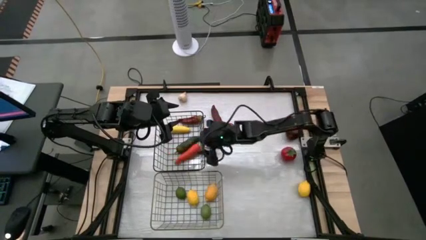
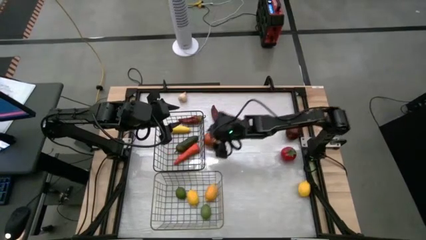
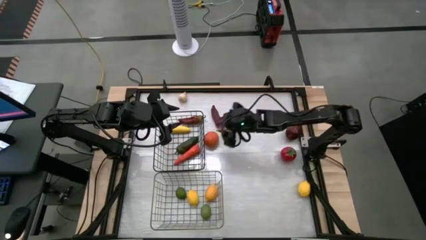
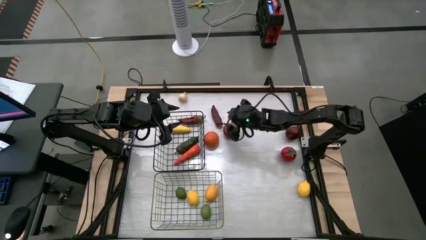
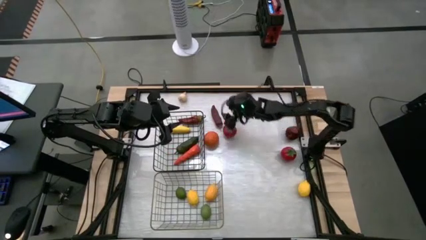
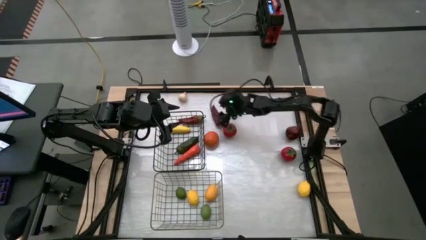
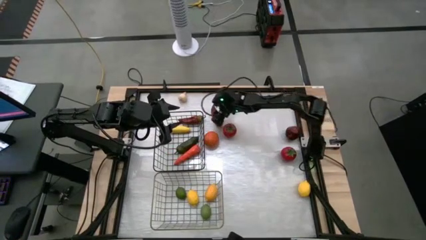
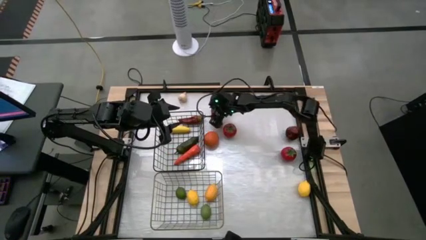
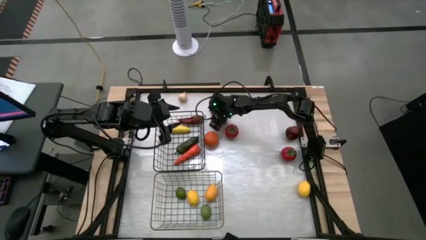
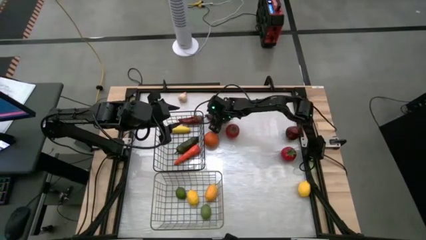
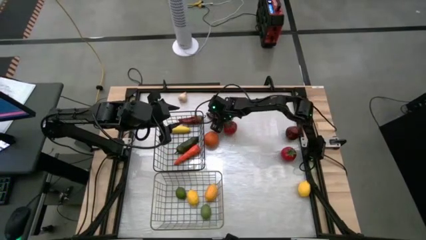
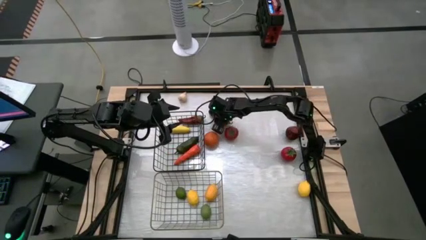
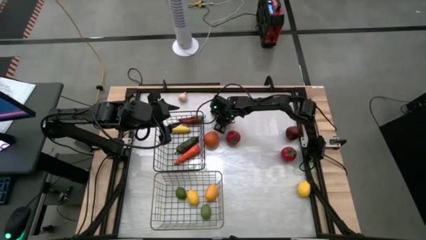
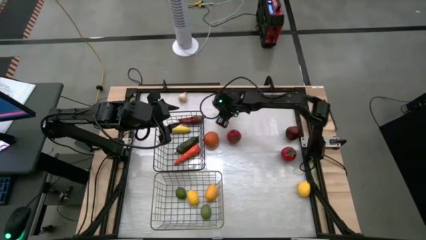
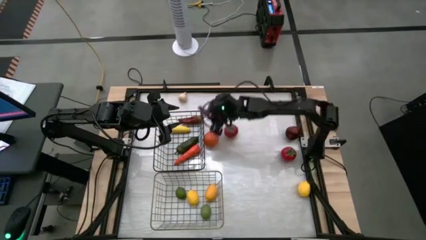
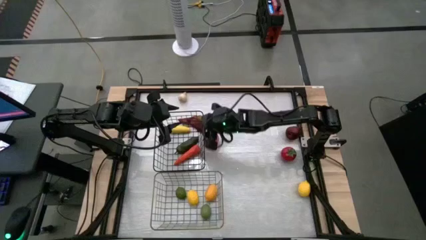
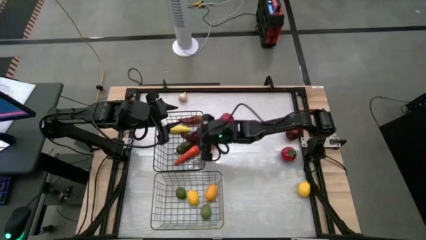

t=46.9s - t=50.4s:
Task: Sort produce into baskets
Put the right red chili pepper into the black wire basket

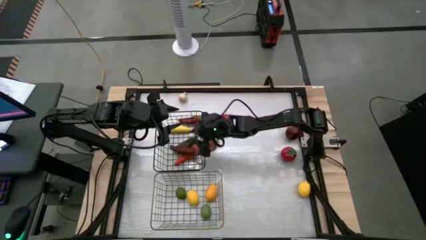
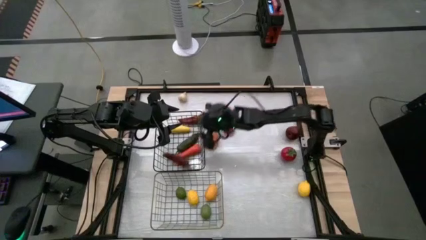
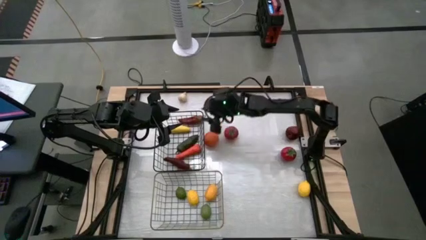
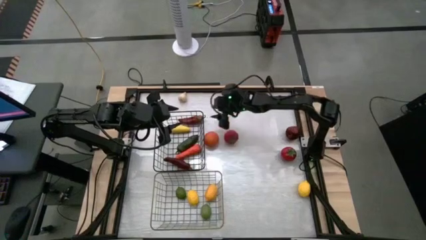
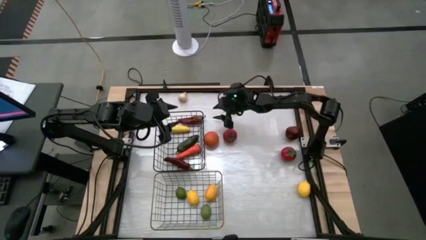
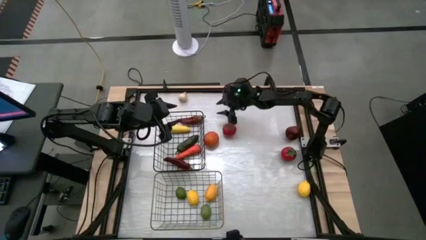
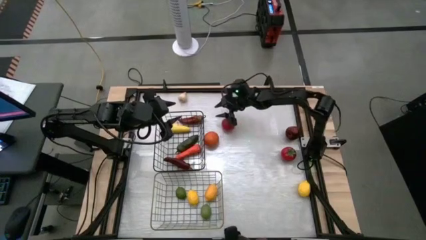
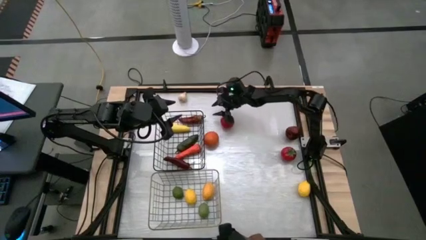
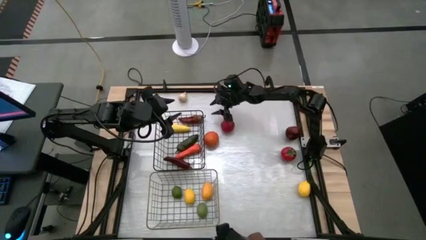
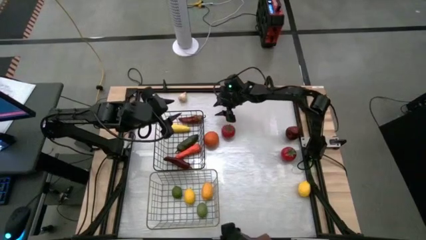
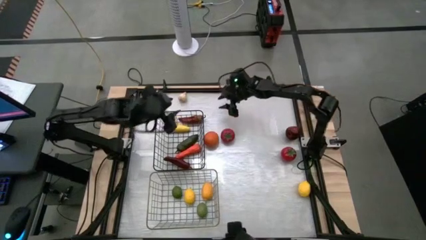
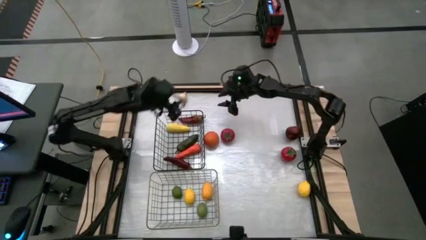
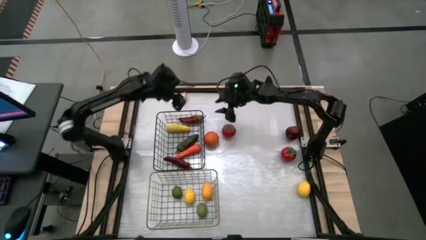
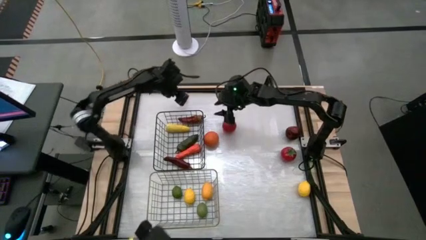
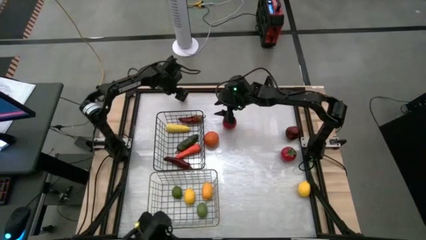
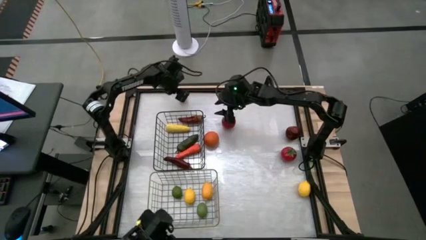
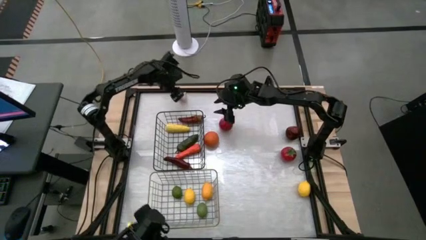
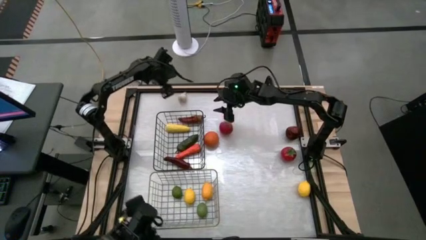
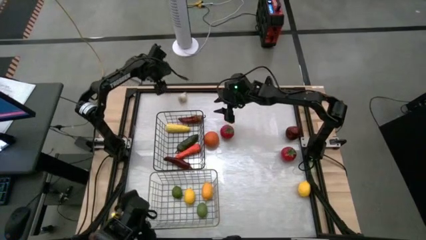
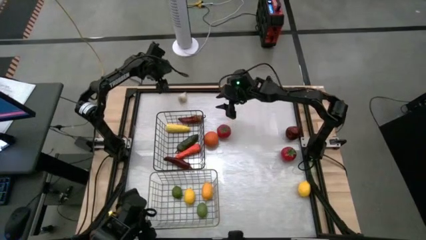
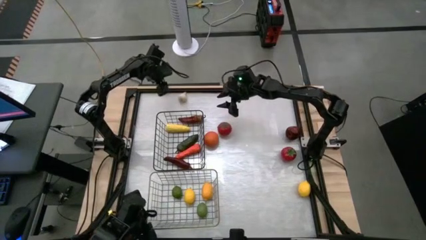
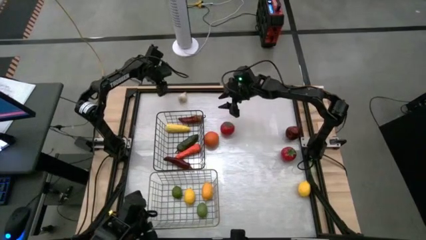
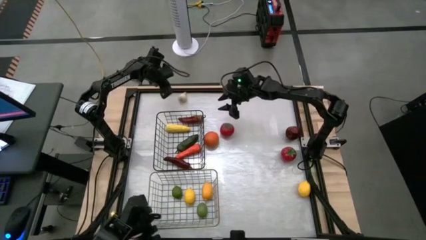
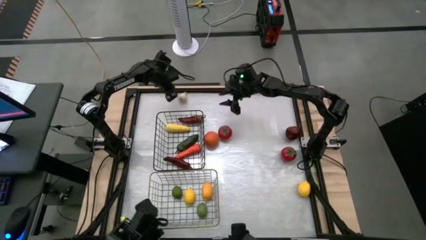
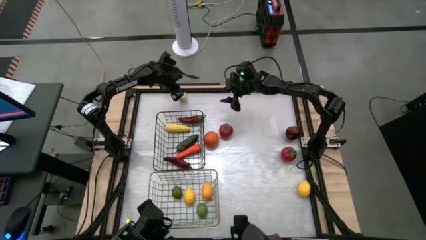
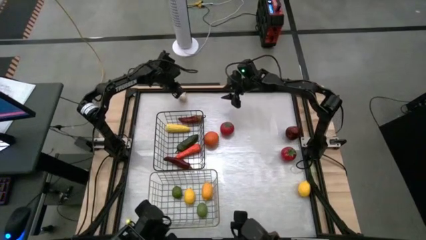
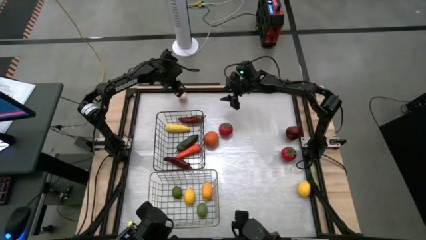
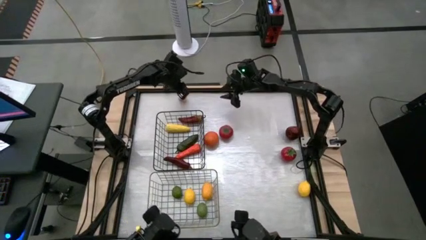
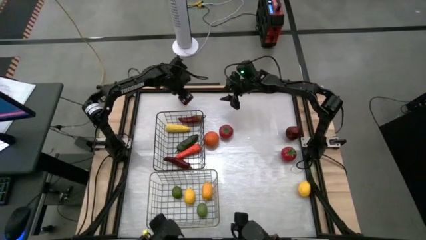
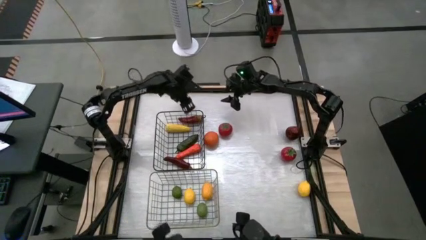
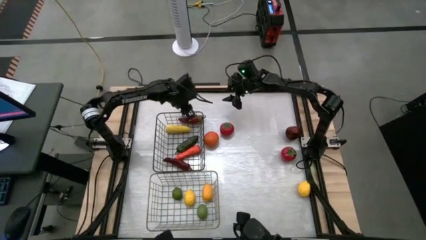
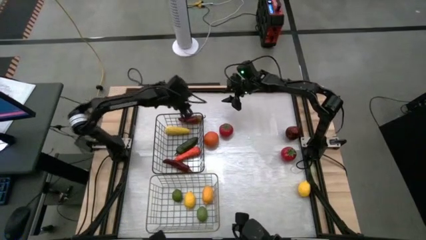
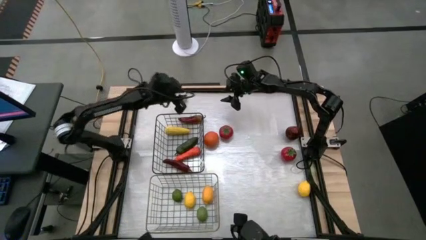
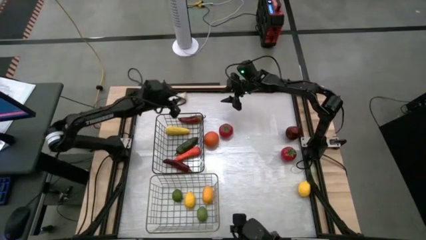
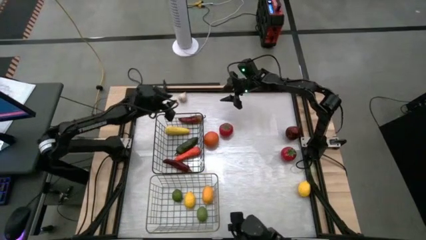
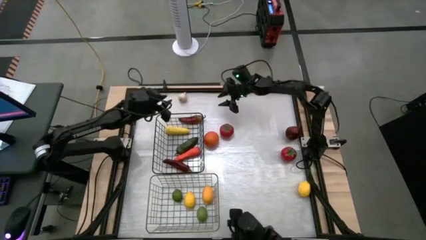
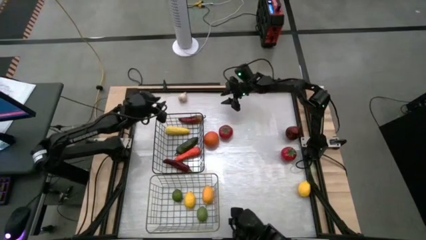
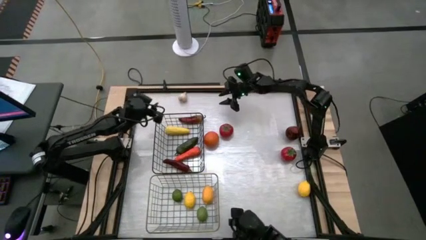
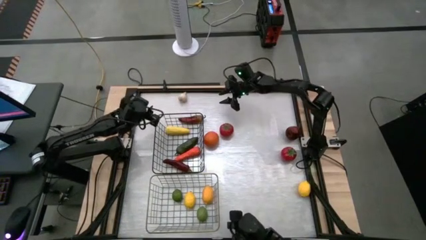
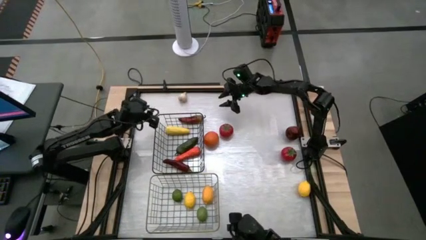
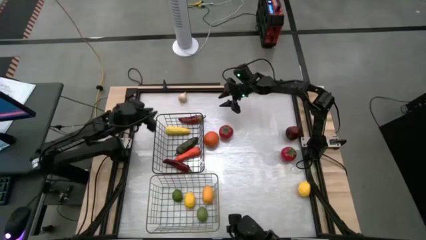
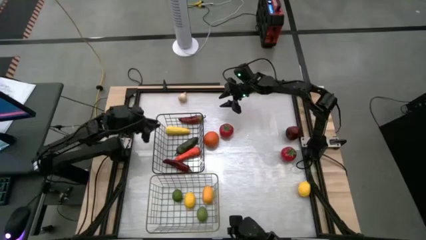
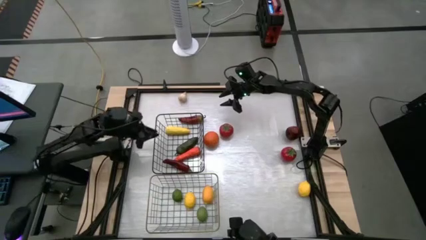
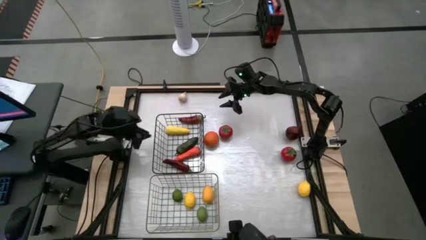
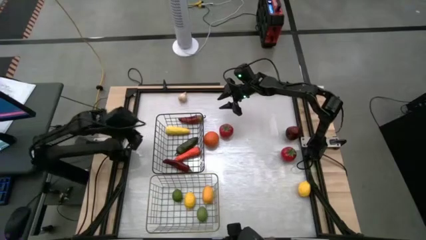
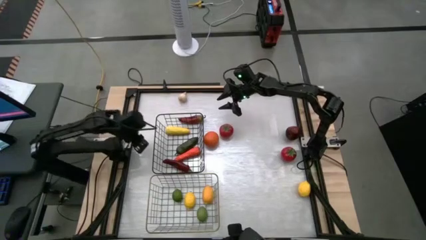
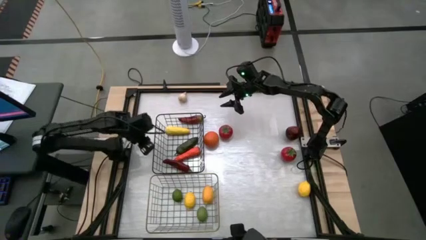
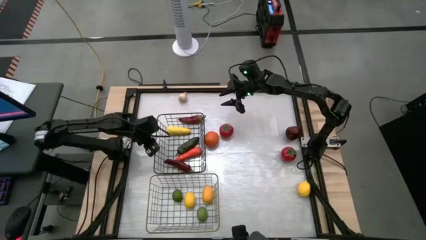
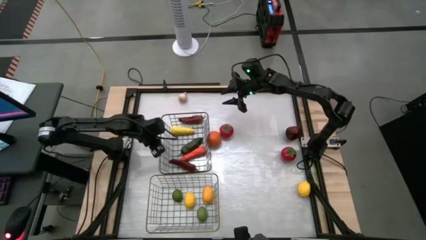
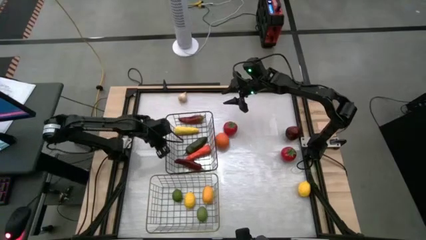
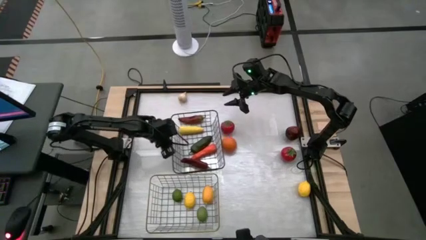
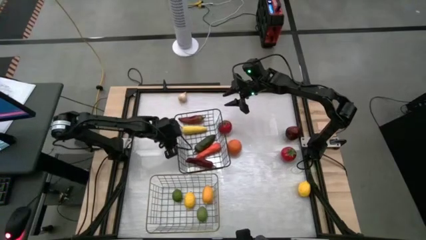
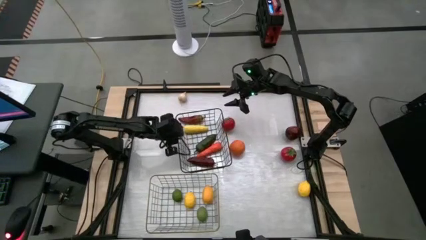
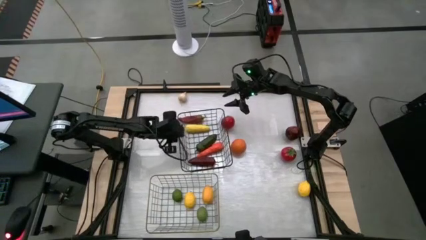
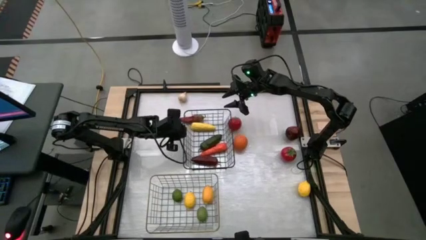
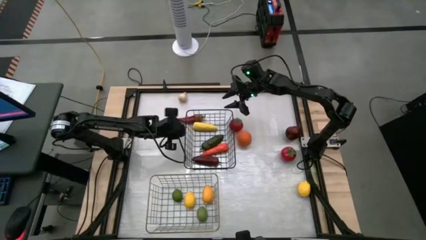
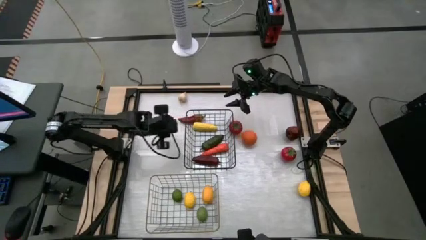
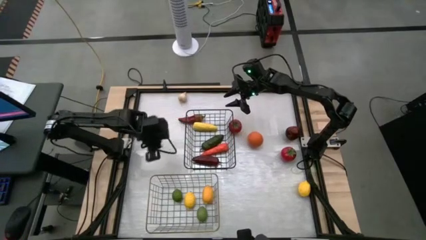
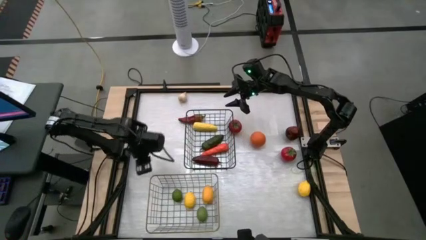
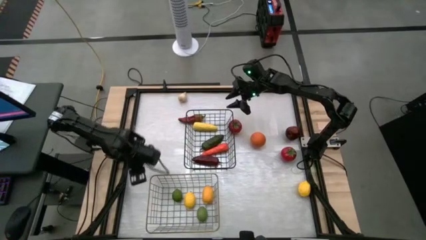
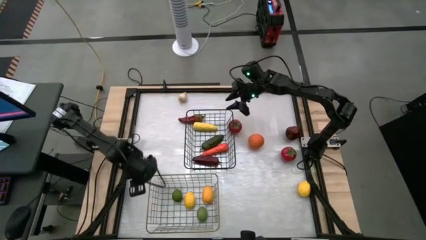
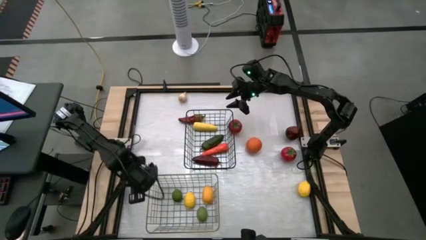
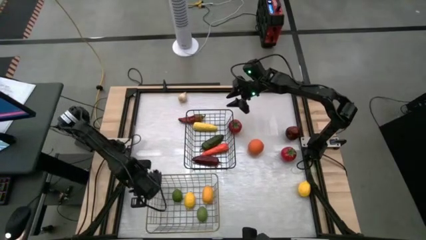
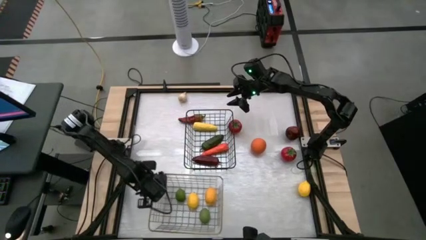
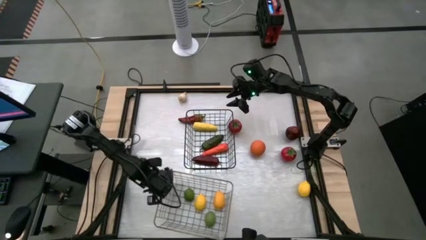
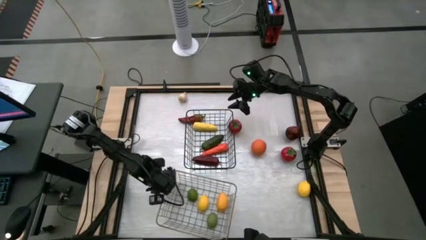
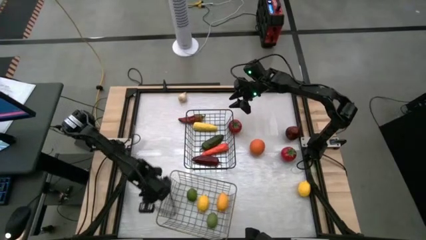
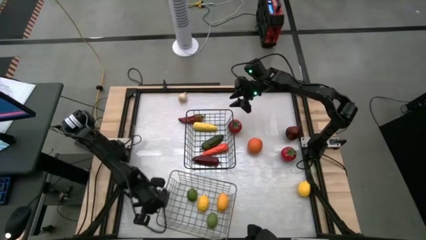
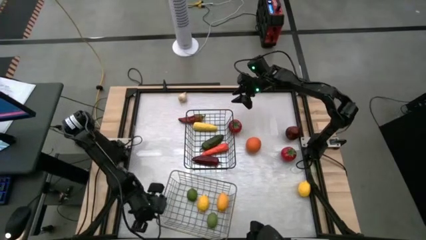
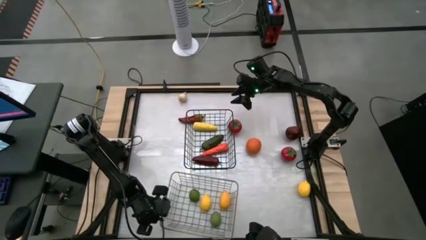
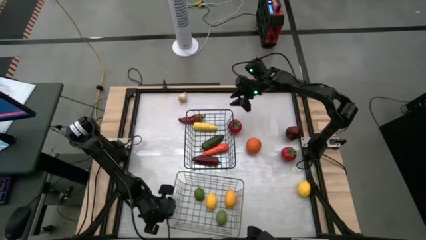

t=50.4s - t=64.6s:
Adjust the wire baskets on the table
